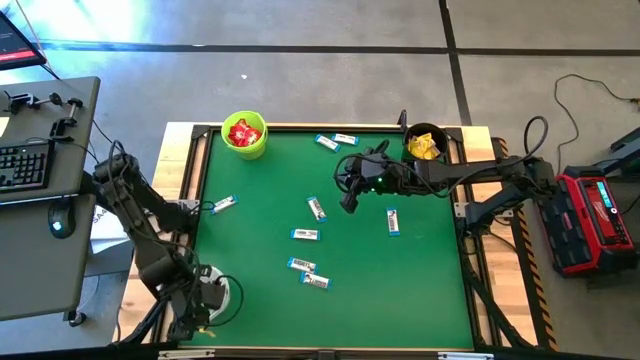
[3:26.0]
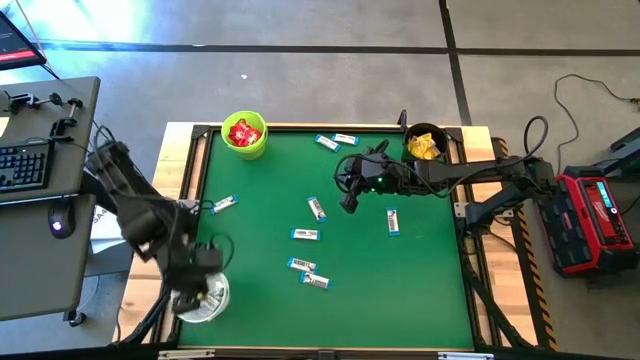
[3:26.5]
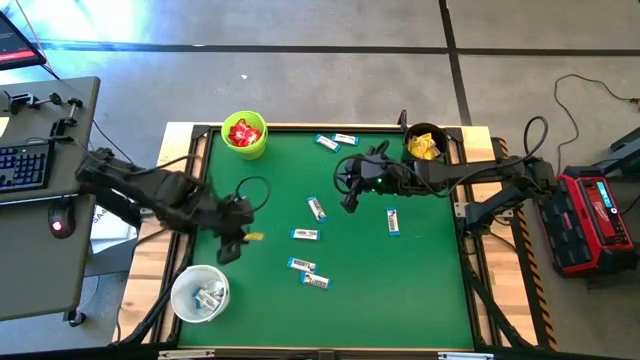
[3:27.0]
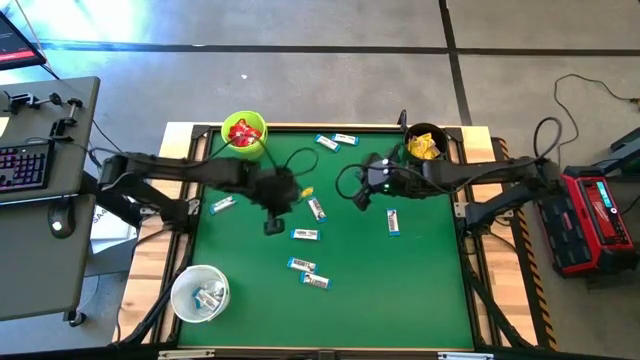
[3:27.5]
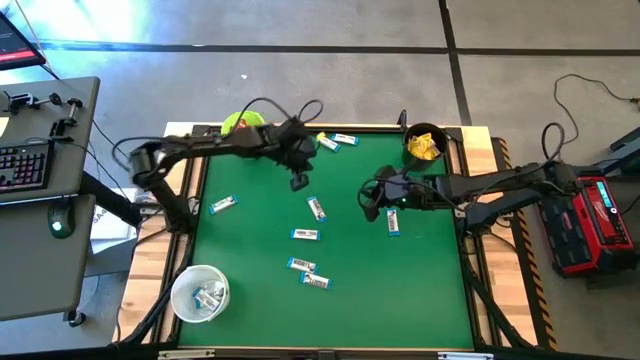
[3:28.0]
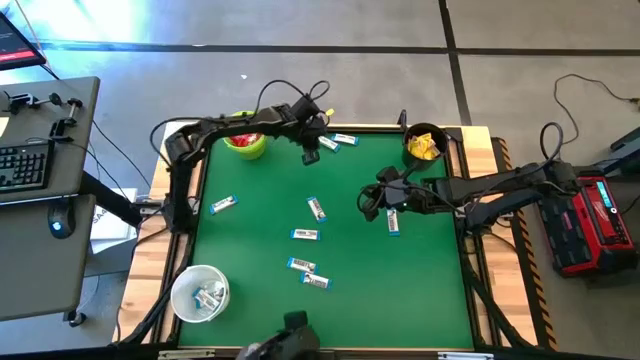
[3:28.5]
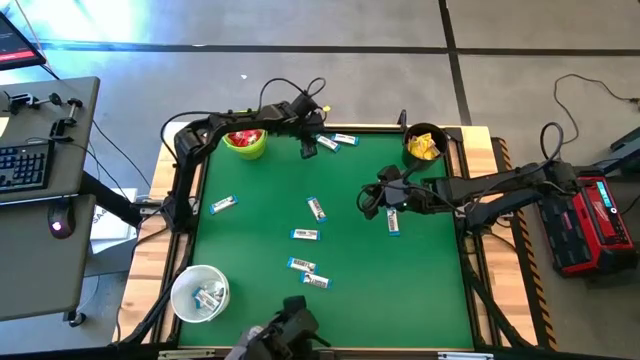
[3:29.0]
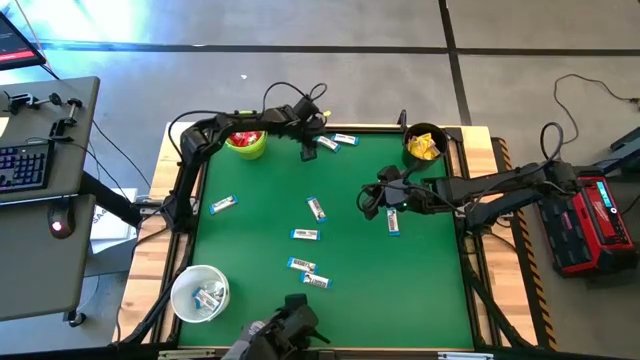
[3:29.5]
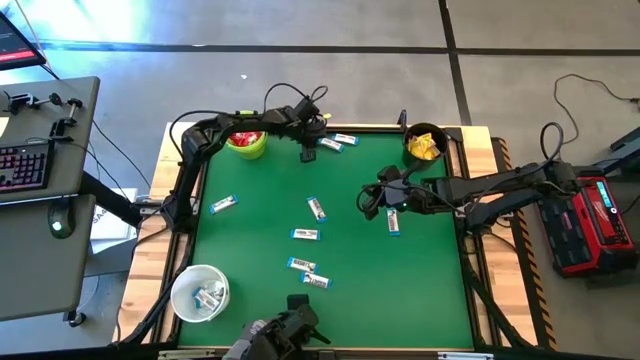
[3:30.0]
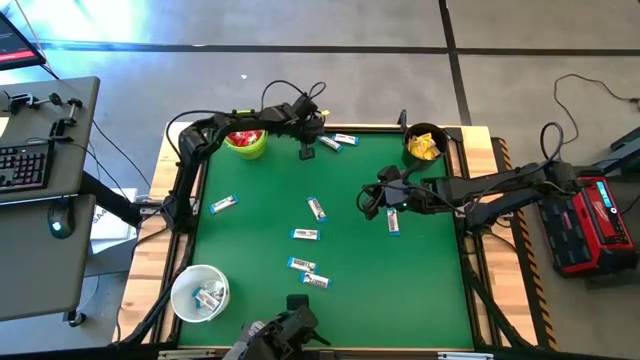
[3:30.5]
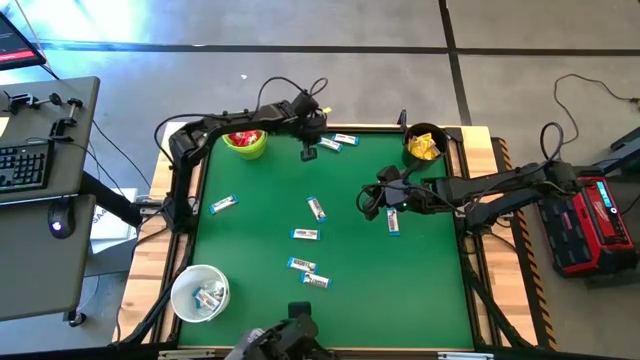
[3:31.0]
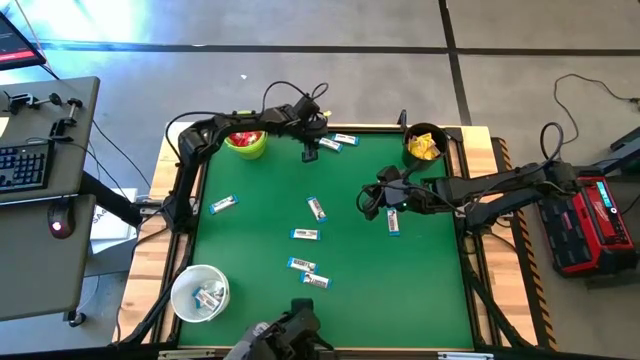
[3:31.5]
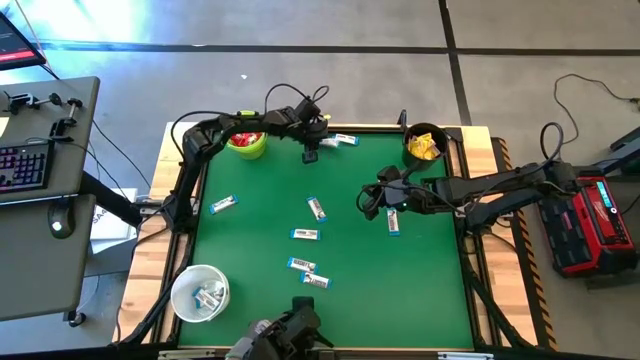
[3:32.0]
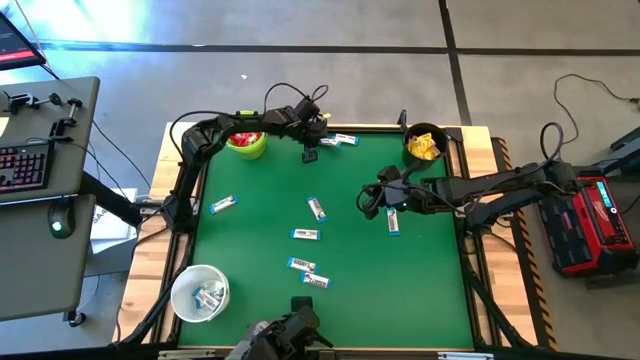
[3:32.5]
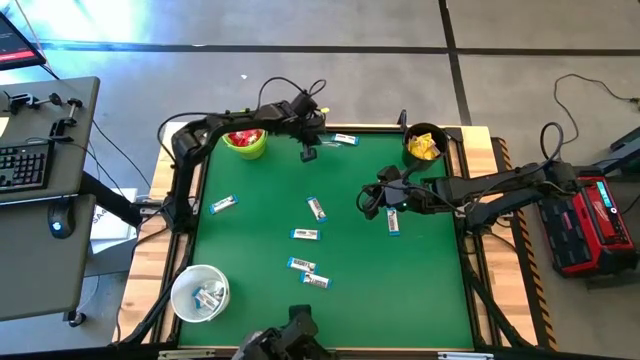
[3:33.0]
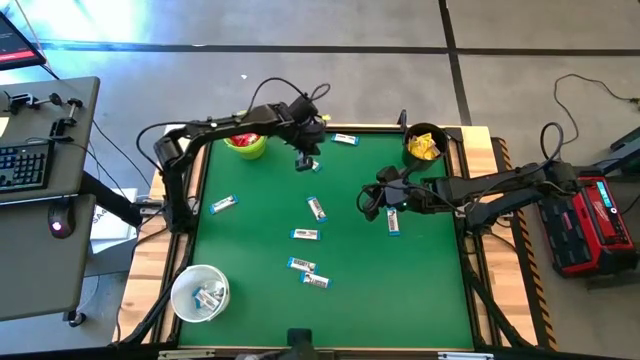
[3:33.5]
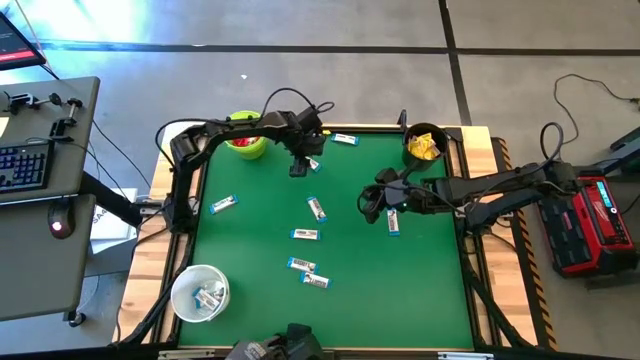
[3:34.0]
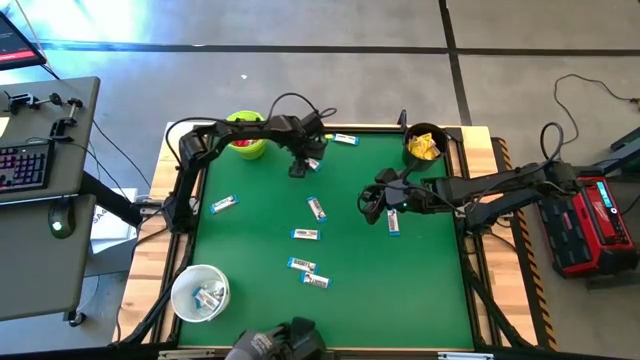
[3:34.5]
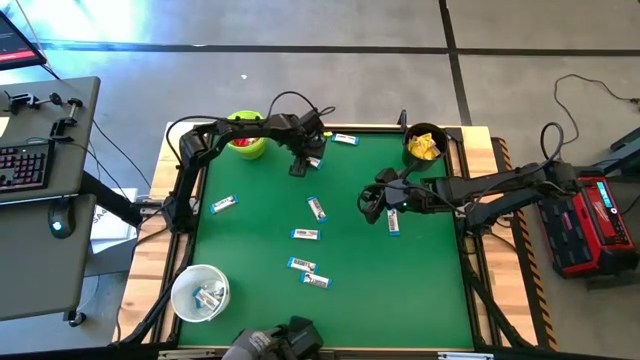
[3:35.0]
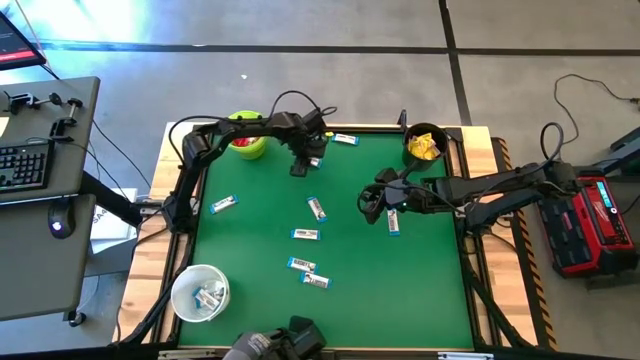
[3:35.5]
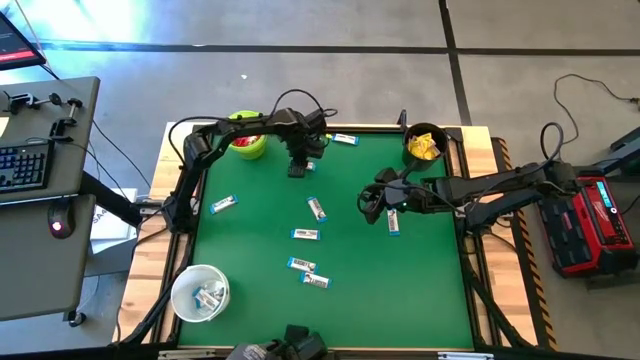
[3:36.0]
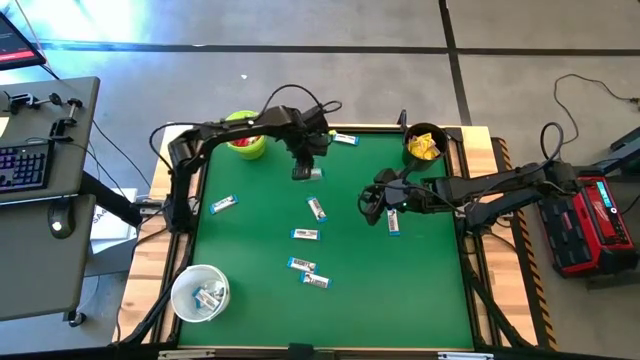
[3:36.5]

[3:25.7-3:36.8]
Task: Sort candy by brand, put in halloween buckets
Put the white chocolate into the white bucket

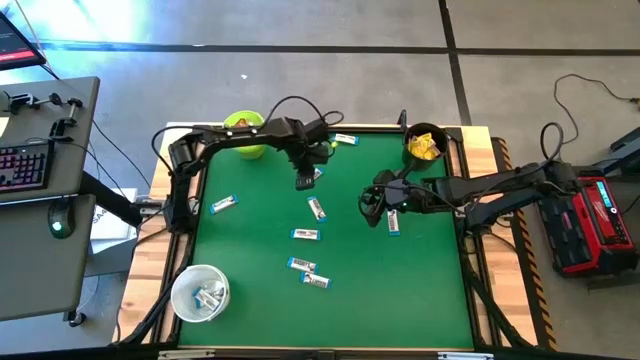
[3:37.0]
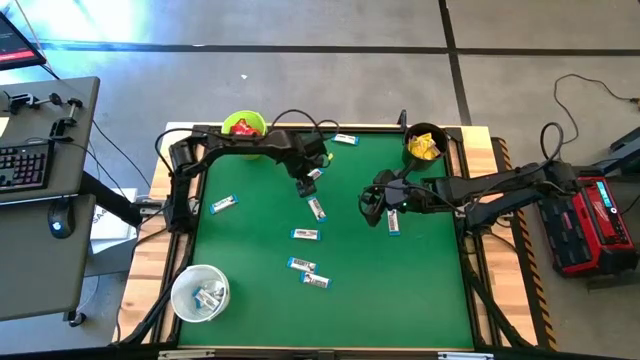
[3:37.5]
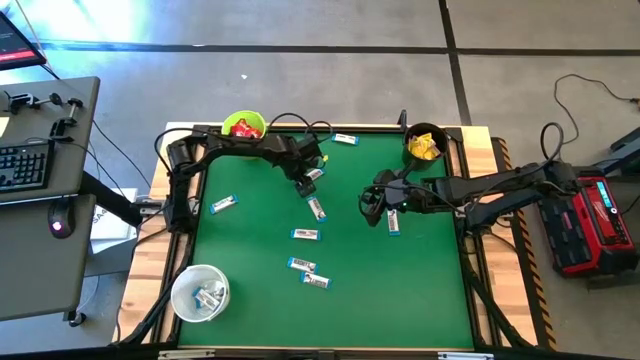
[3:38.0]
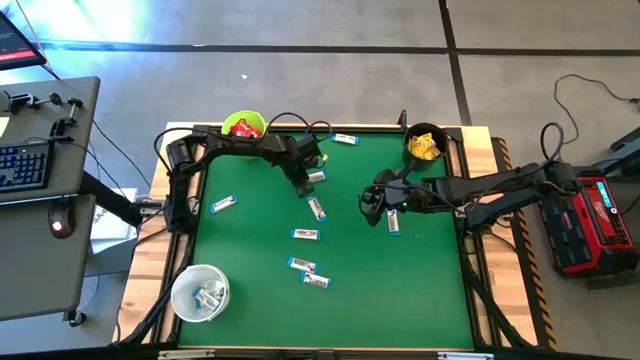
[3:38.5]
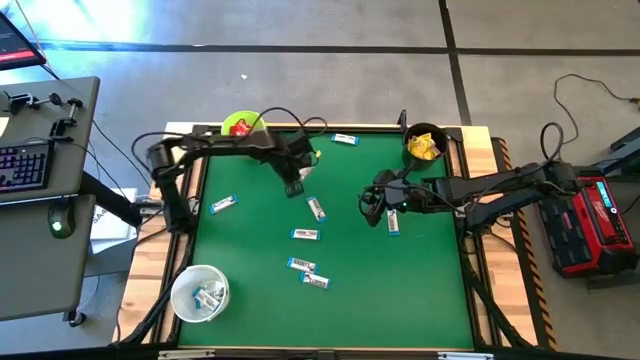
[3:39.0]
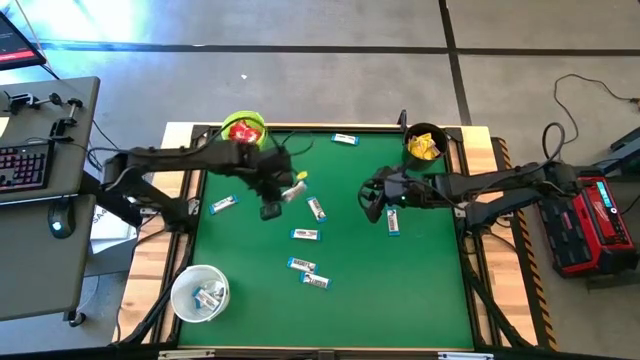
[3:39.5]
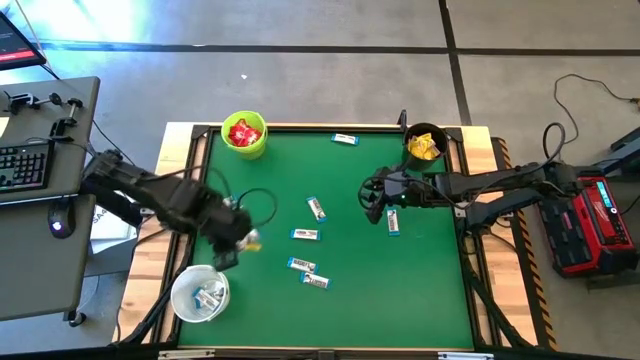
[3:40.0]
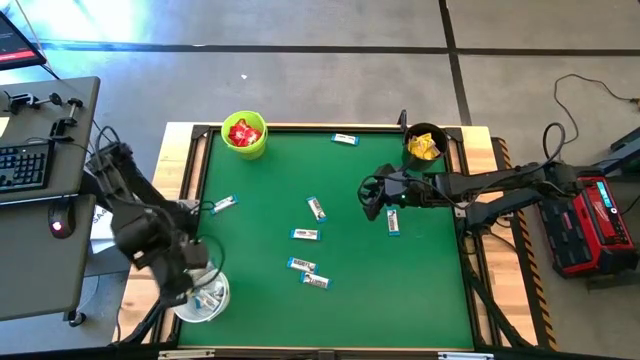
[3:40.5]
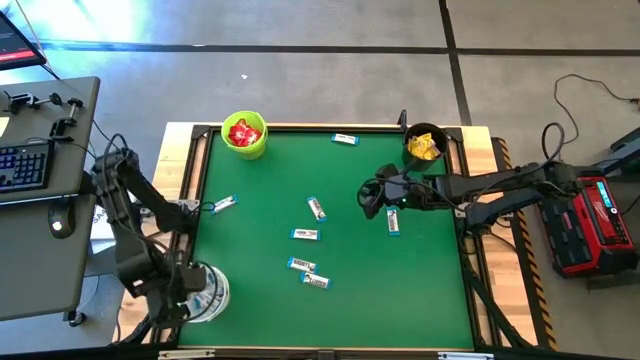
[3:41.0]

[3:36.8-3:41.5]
Put the white chocolate into the white bucket

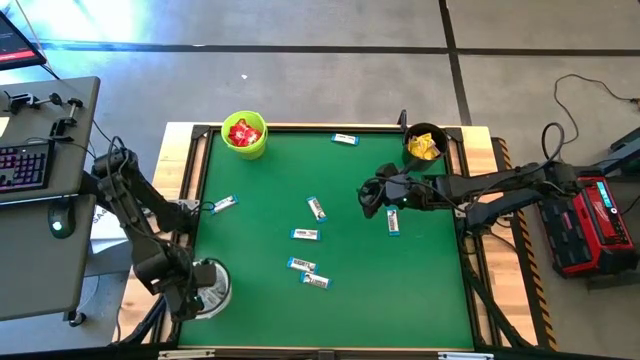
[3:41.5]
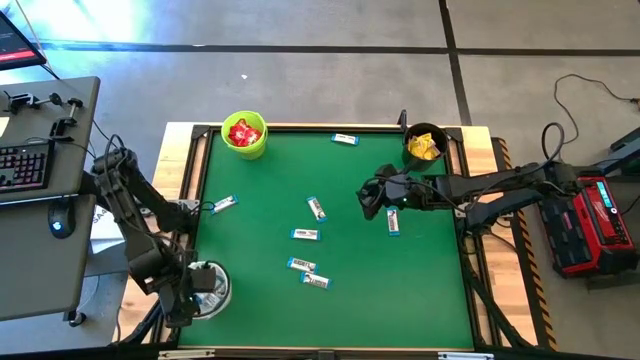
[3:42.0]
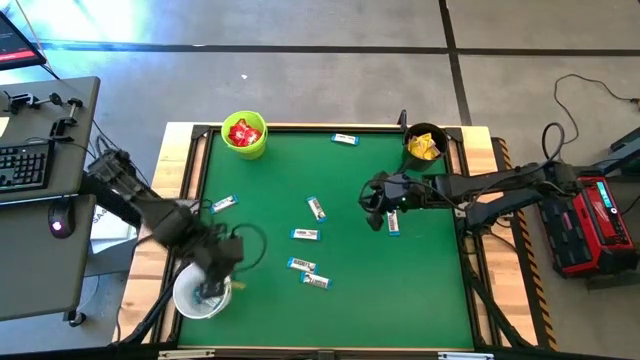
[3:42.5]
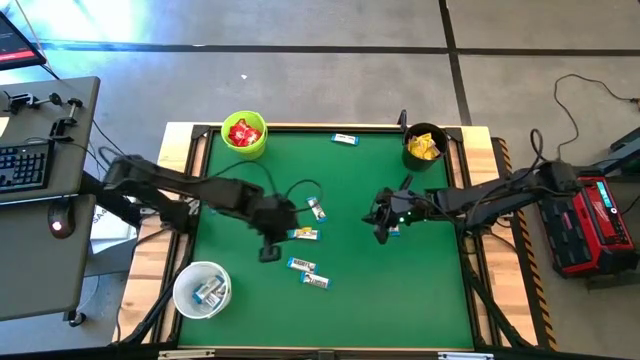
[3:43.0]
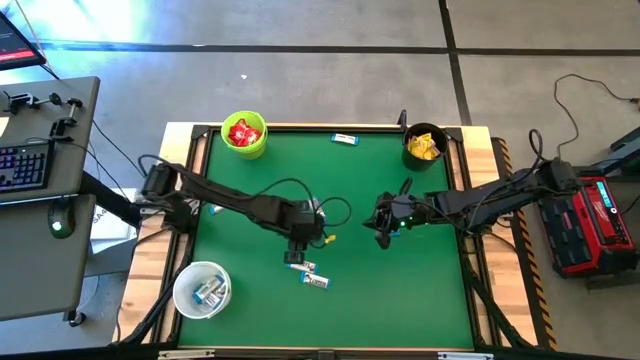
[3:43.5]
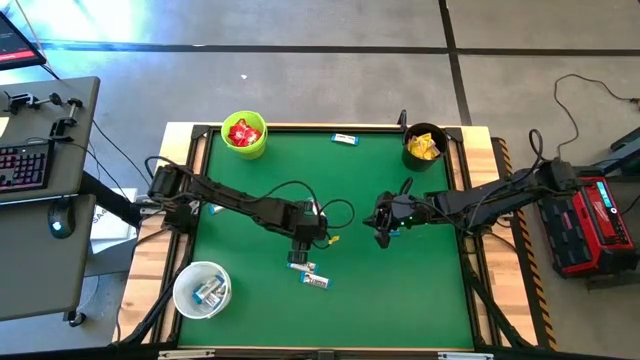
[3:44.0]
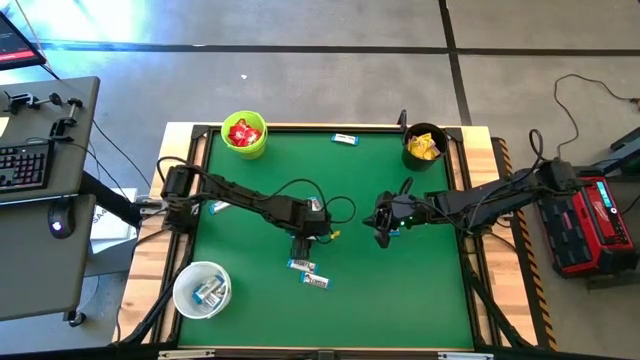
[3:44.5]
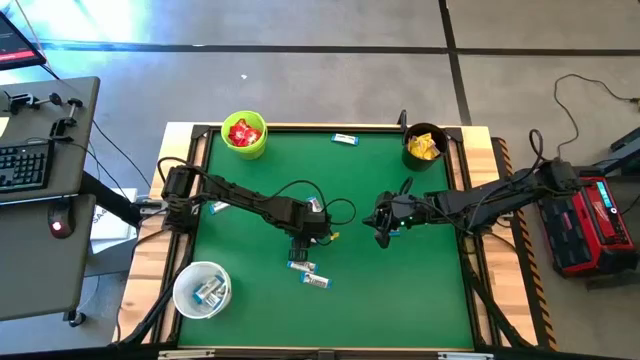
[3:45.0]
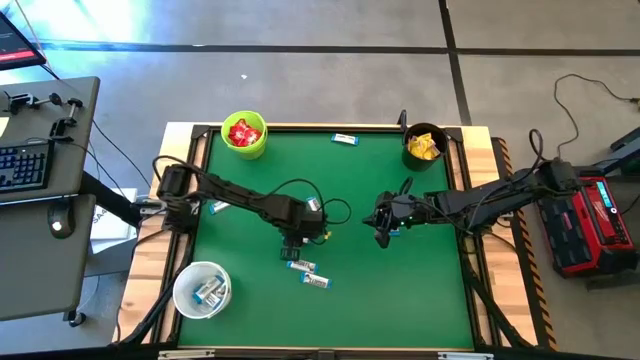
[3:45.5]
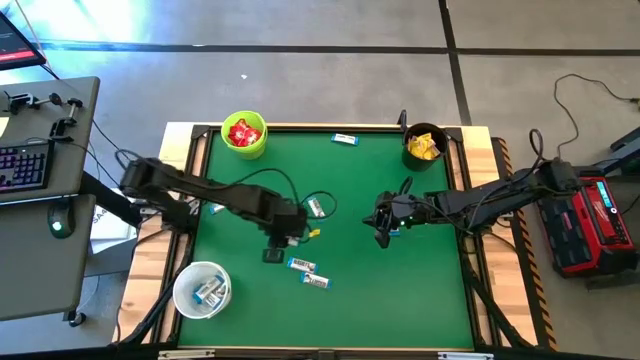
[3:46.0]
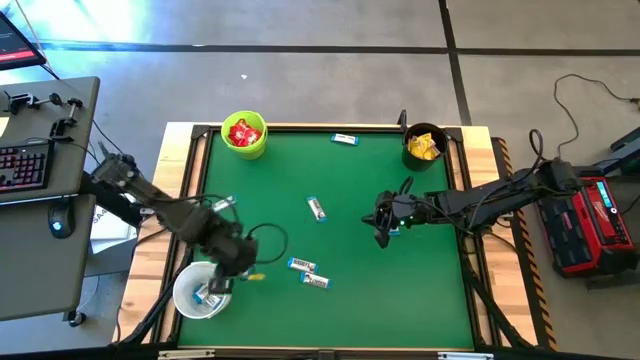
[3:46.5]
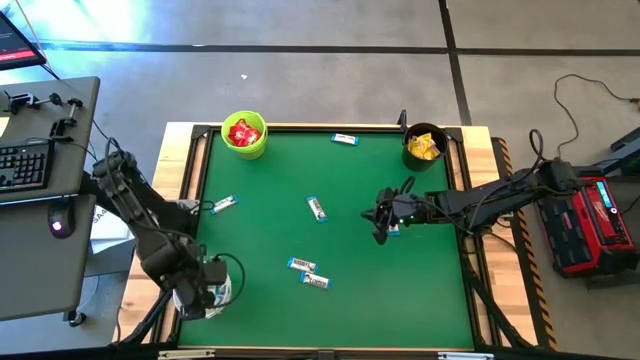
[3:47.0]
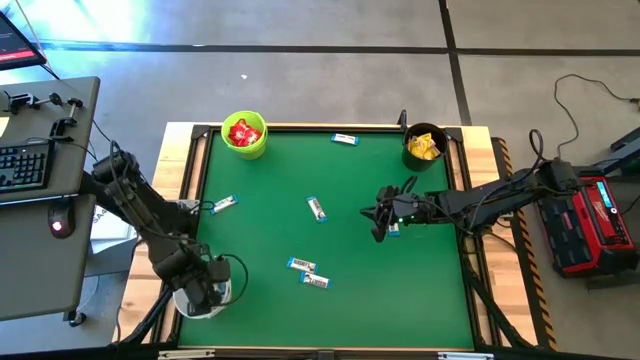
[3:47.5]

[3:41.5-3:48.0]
Put the white chocolate into the white bucket
